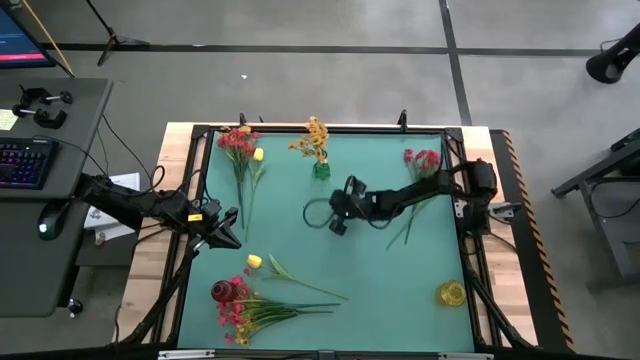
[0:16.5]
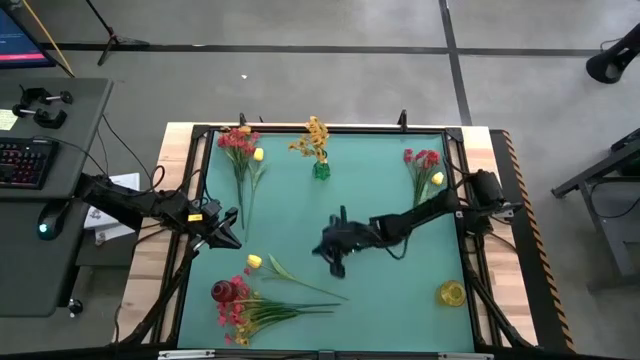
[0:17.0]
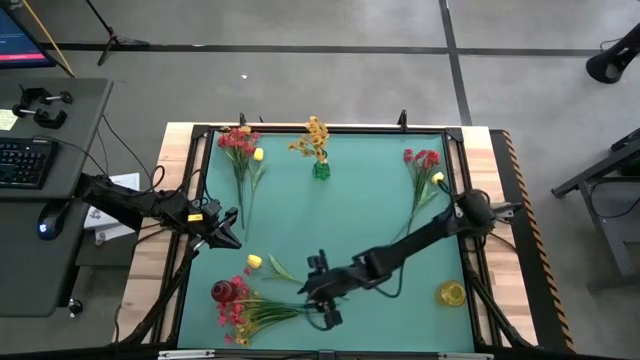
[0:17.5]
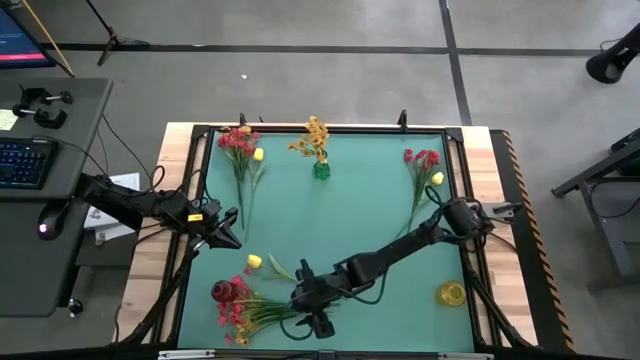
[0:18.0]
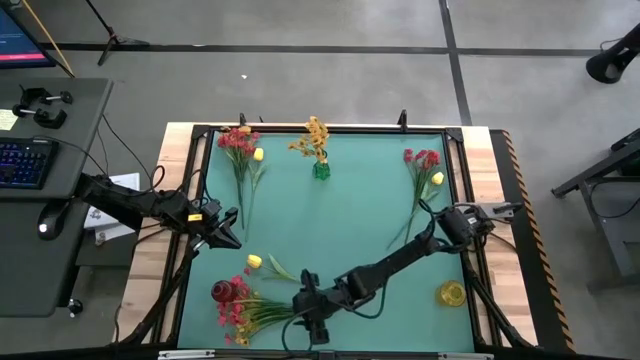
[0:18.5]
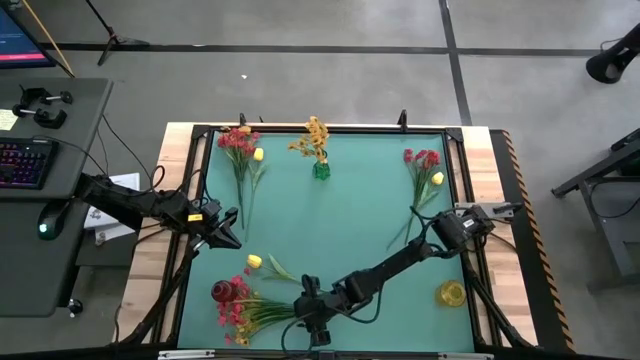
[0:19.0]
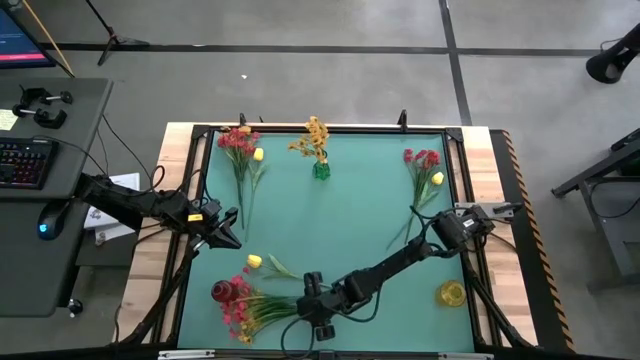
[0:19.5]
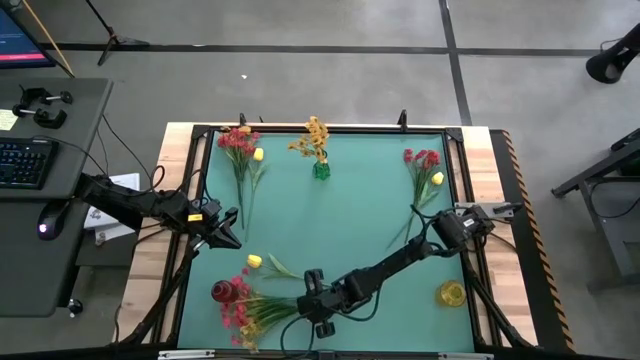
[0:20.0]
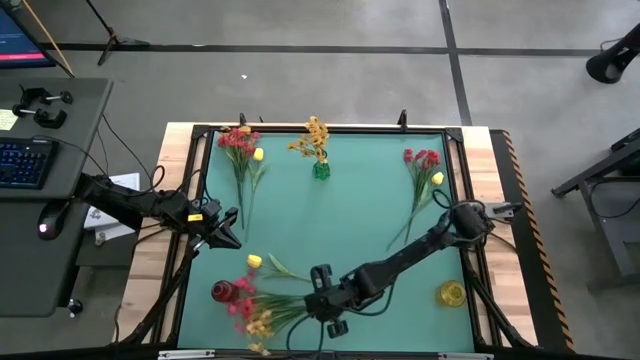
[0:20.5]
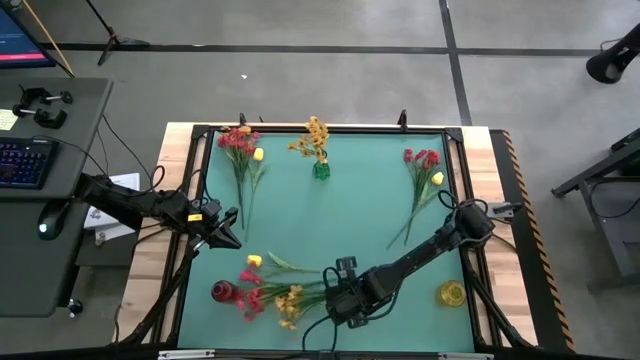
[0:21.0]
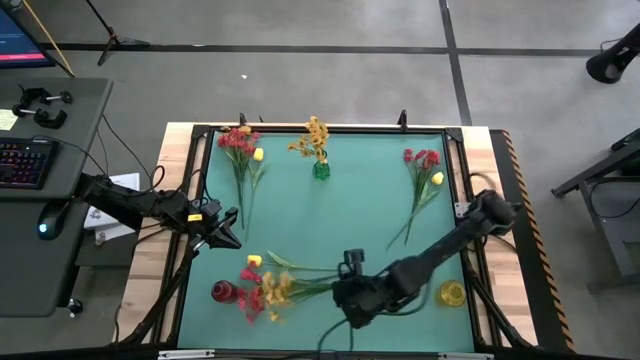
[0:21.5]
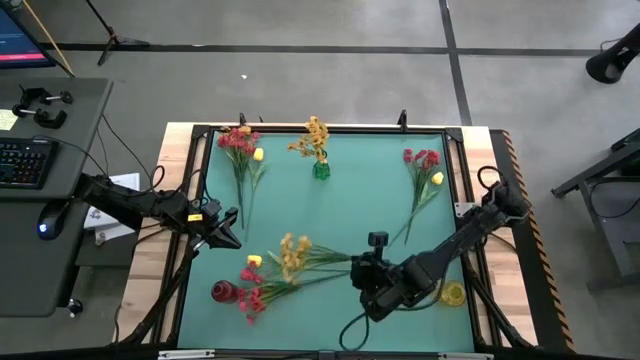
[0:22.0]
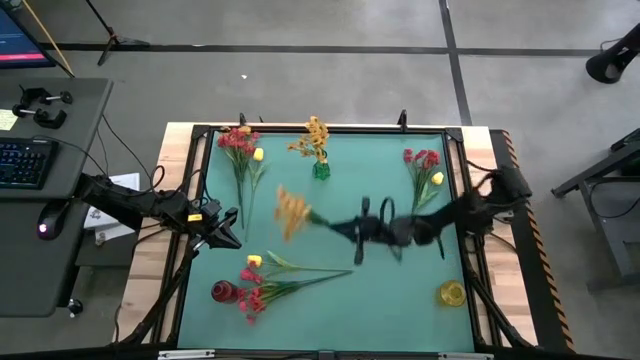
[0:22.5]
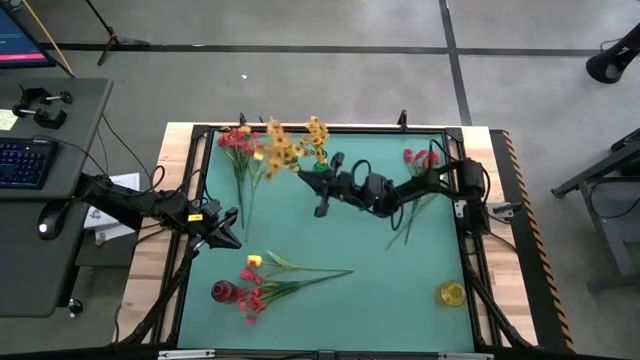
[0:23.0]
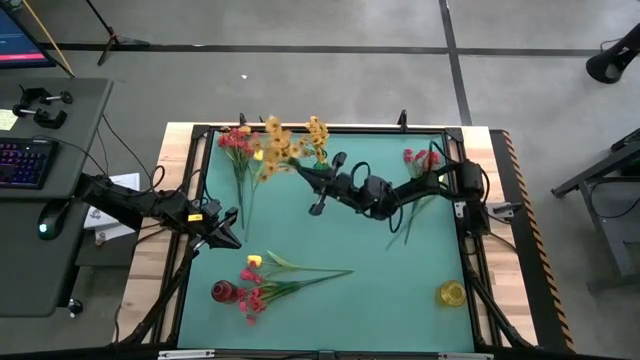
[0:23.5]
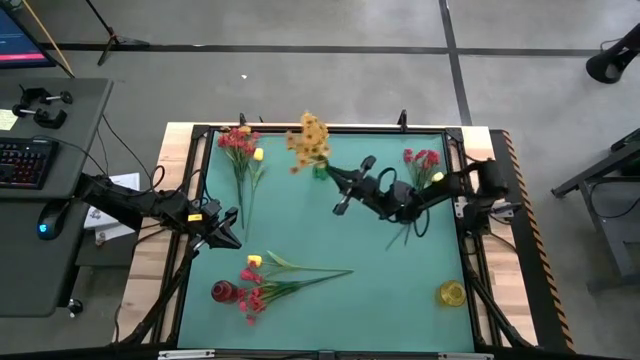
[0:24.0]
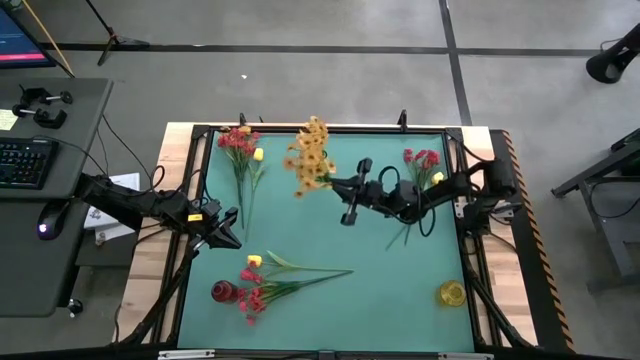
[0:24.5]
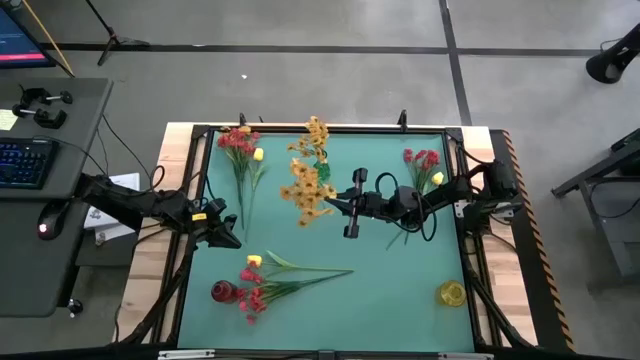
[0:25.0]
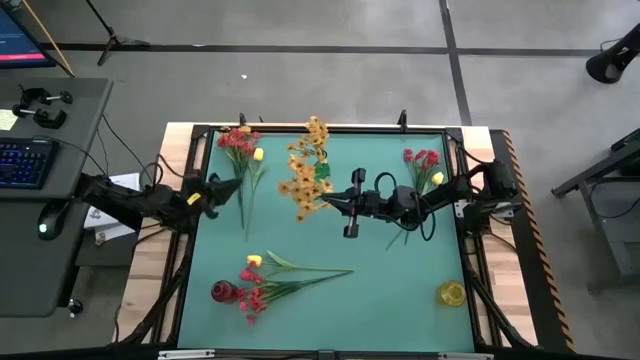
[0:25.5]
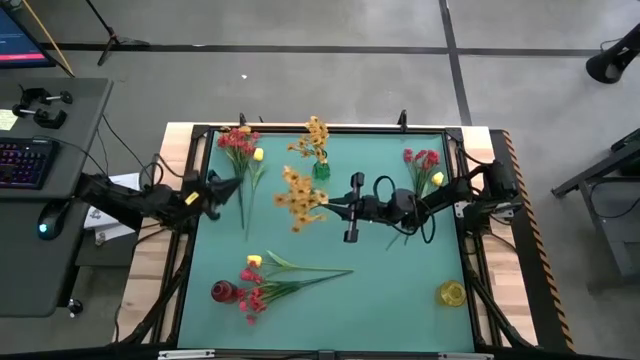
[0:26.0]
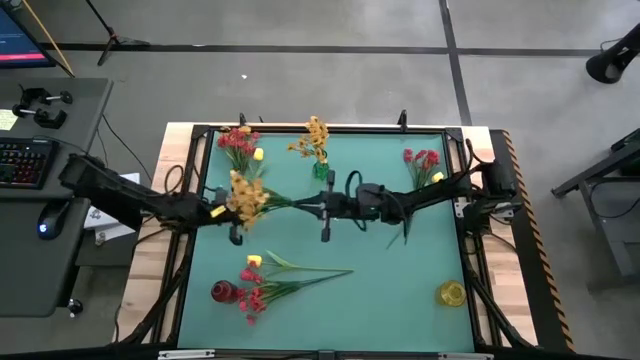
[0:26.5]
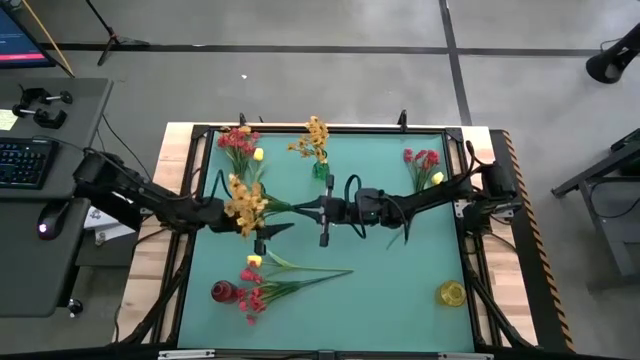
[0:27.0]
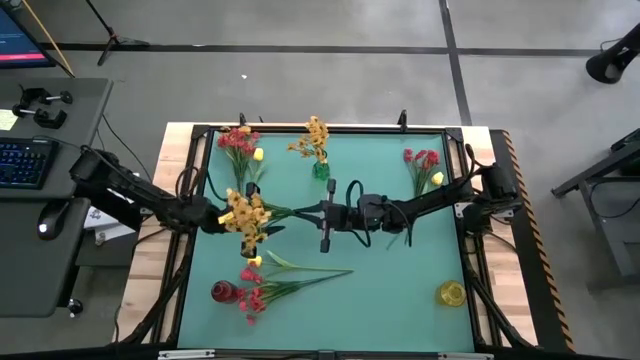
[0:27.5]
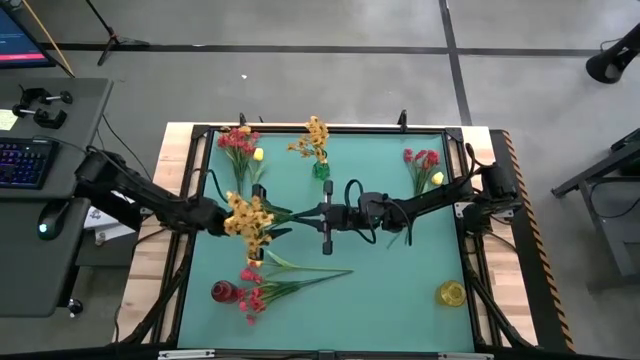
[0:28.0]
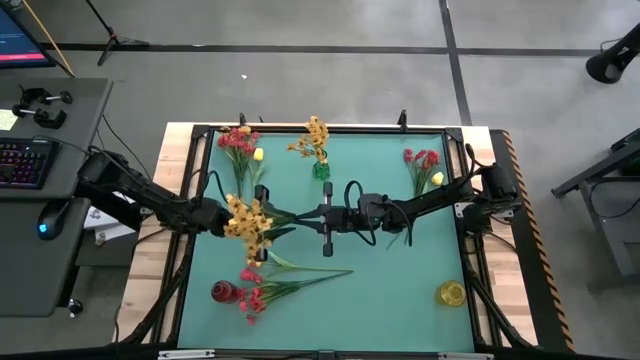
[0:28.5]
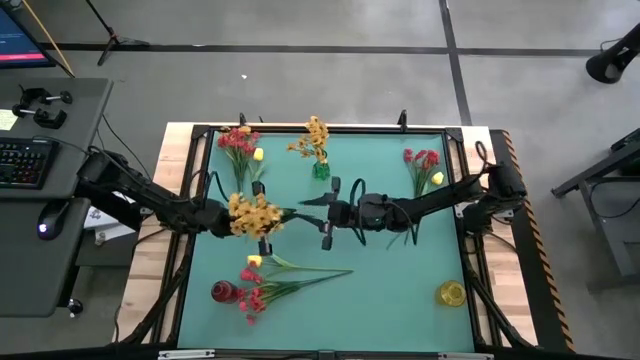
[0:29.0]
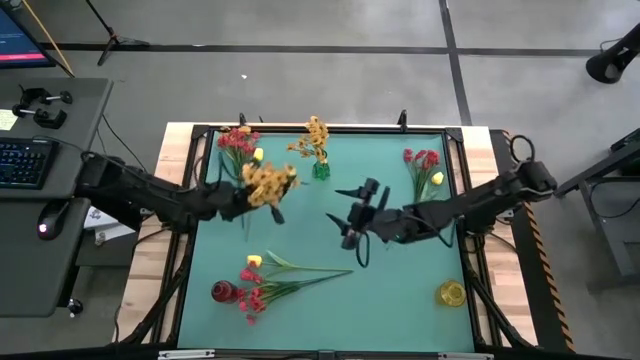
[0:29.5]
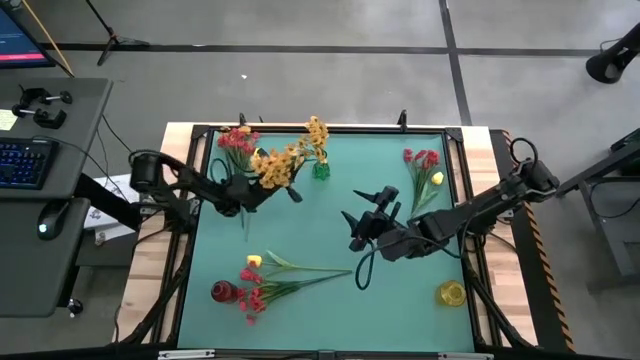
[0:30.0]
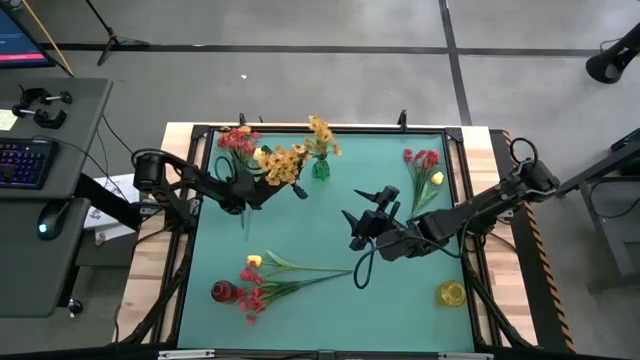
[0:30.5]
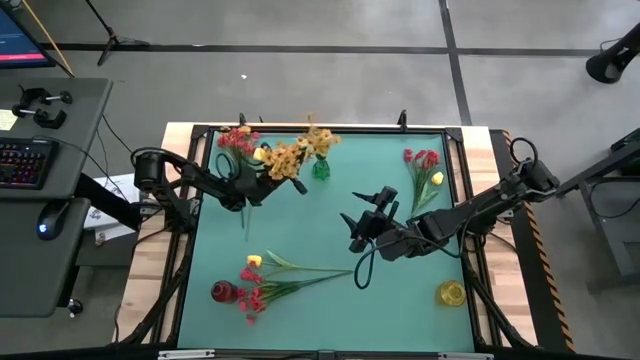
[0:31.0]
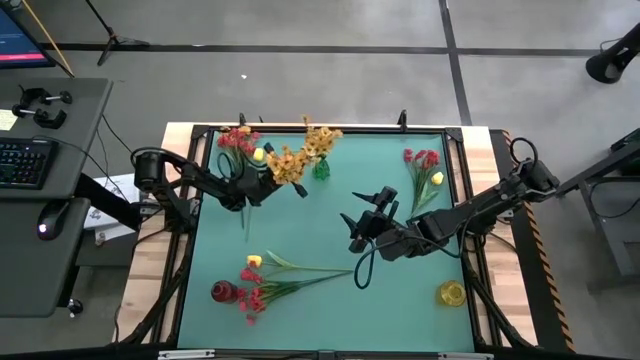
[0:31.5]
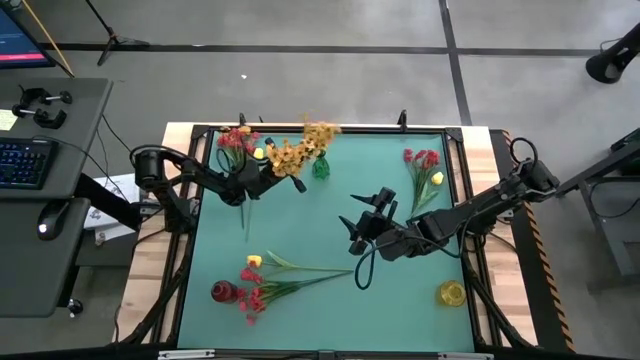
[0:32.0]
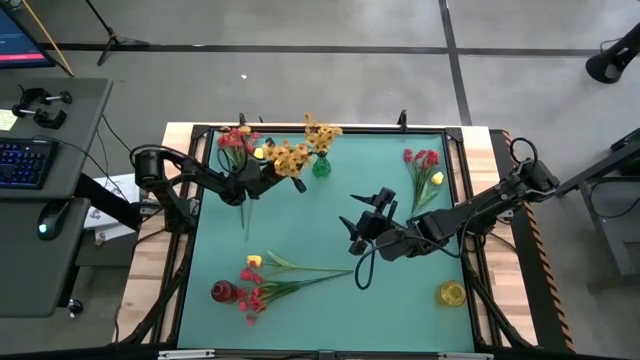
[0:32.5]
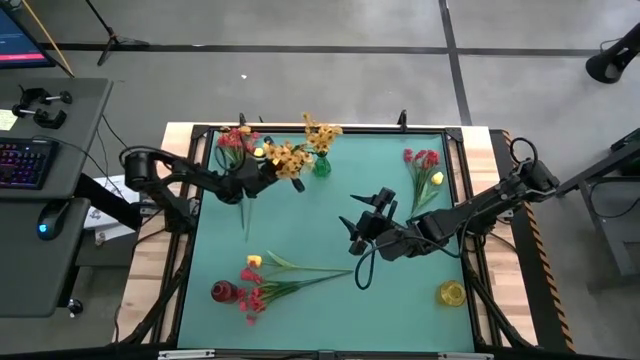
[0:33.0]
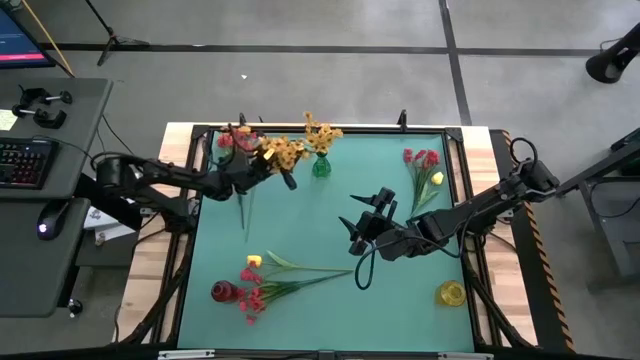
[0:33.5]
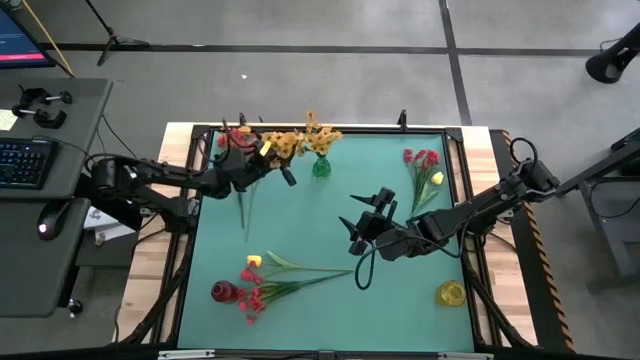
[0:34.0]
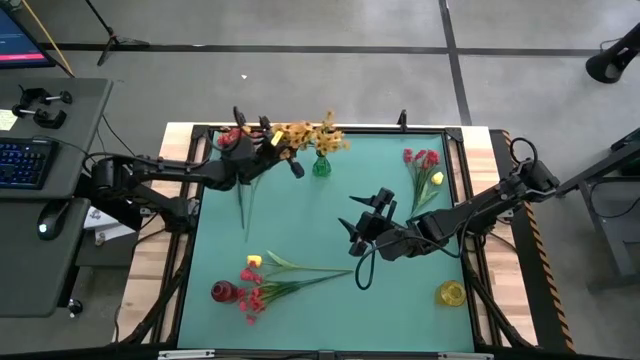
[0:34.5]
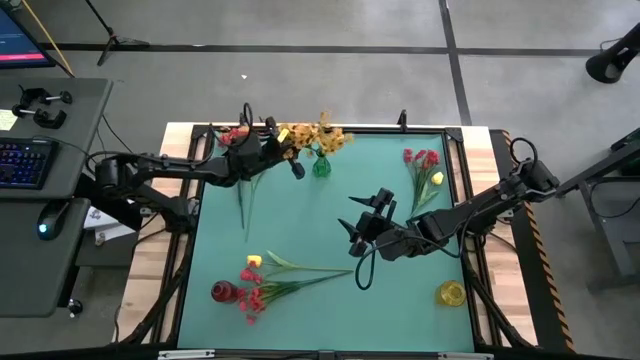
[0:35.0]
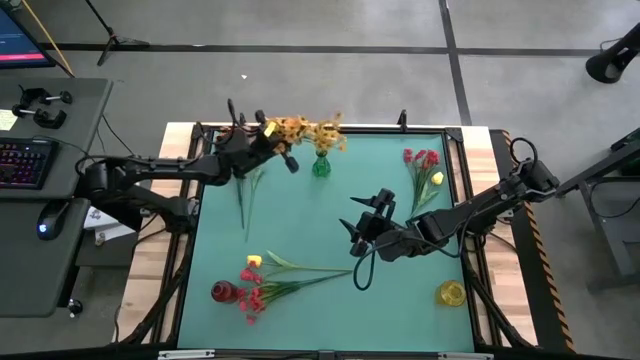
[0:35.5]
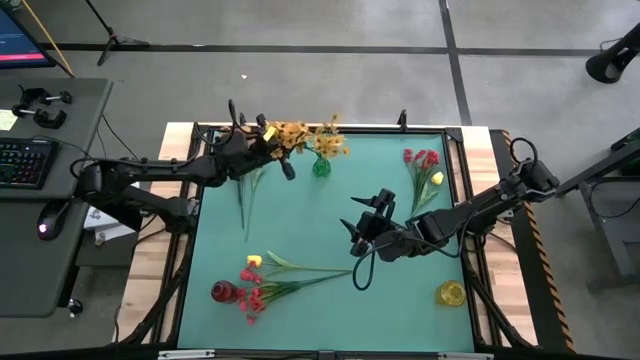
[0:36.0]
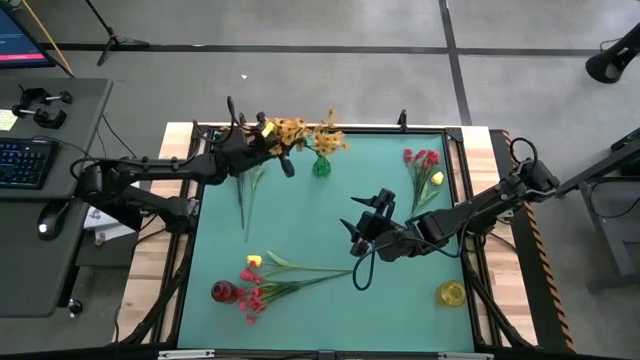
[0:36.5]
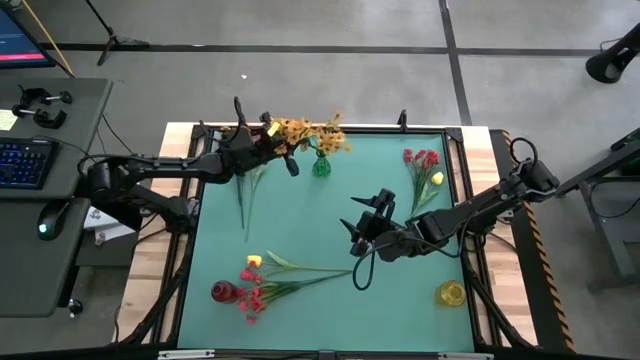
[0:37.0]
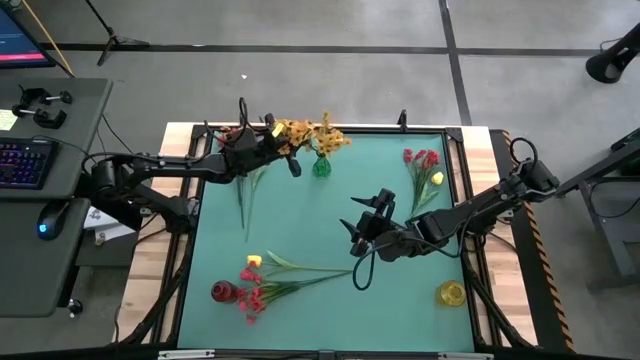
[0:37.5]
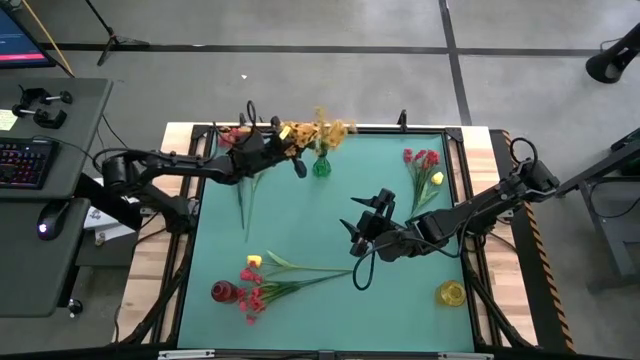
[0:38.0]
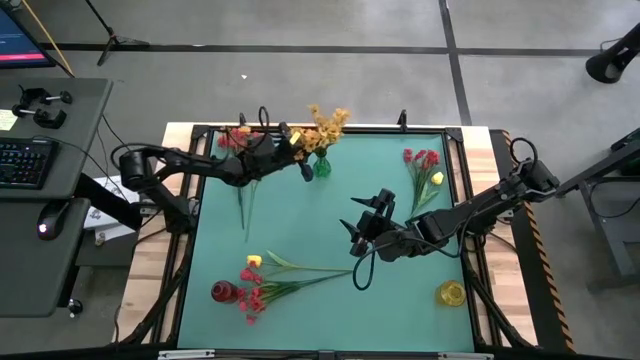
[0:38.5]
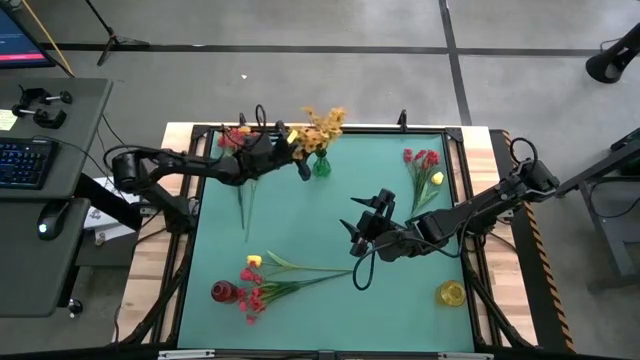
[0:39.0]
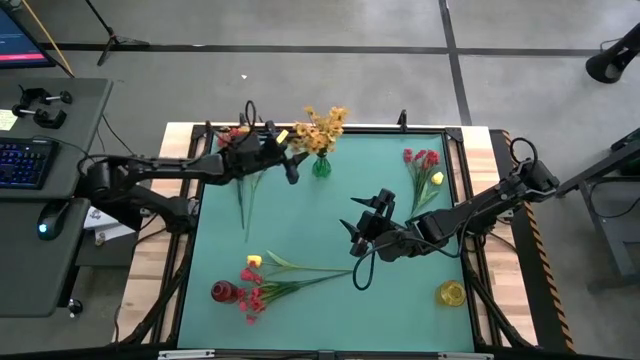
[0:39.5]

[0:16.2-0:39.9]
Task: Sort flowers into vase by color
Put the bottom yellow flower into the green vase
